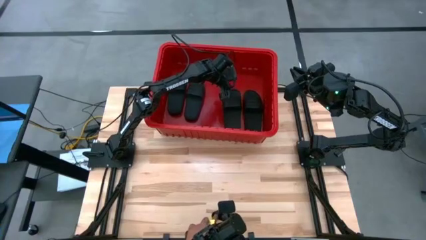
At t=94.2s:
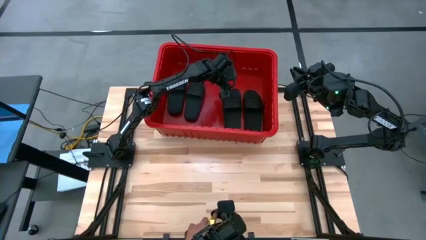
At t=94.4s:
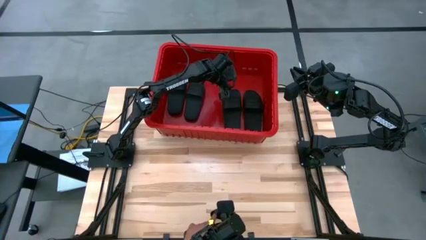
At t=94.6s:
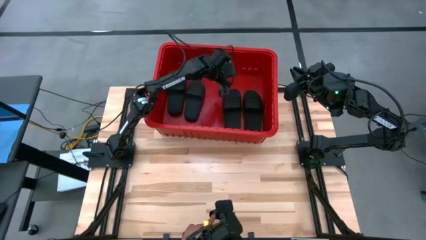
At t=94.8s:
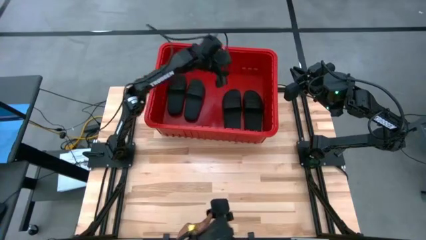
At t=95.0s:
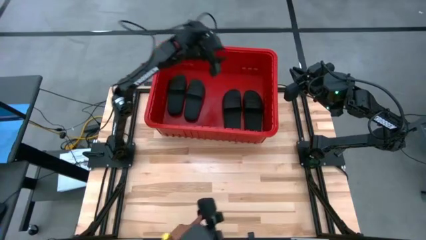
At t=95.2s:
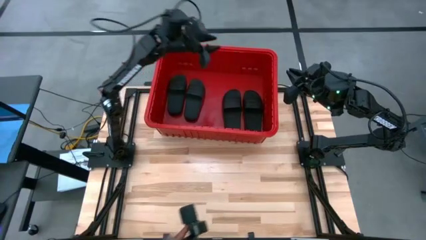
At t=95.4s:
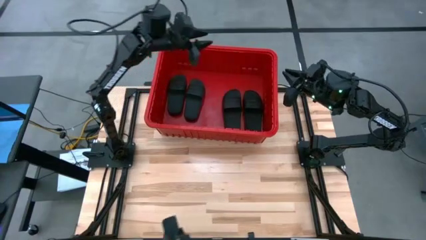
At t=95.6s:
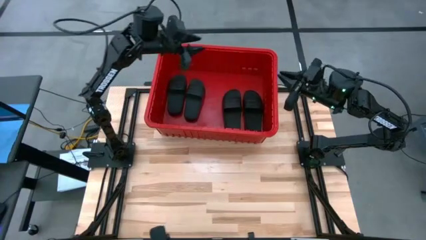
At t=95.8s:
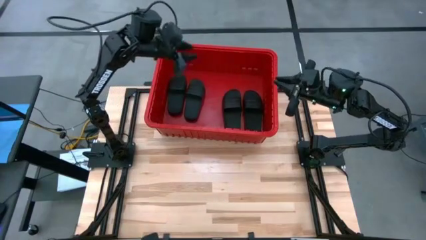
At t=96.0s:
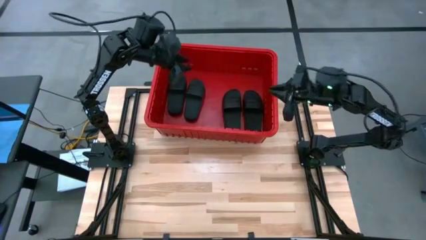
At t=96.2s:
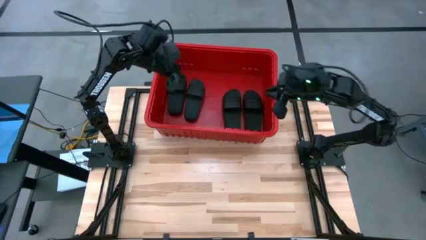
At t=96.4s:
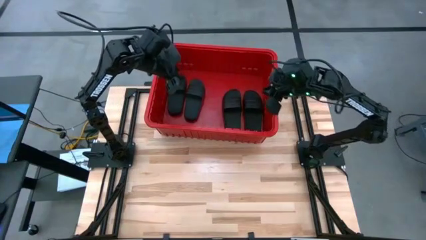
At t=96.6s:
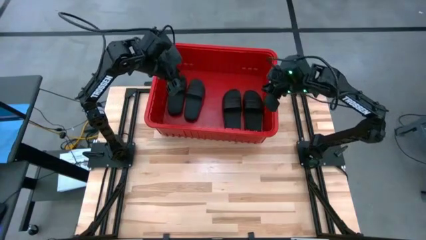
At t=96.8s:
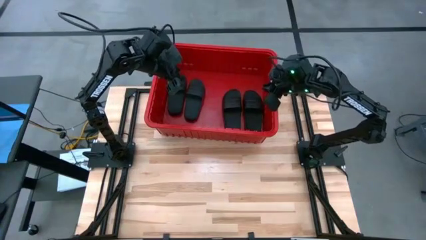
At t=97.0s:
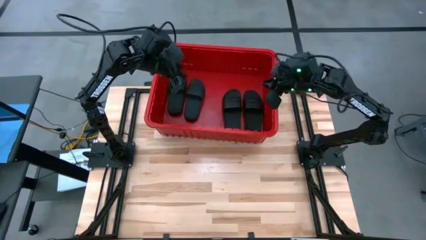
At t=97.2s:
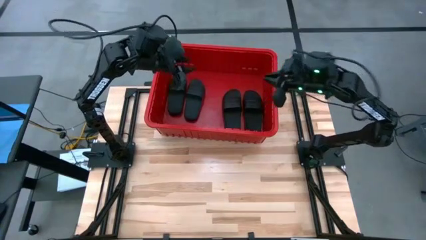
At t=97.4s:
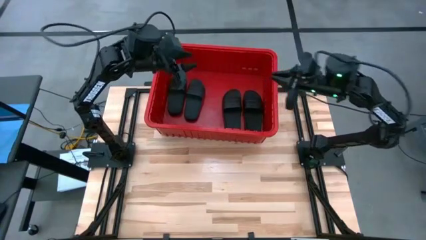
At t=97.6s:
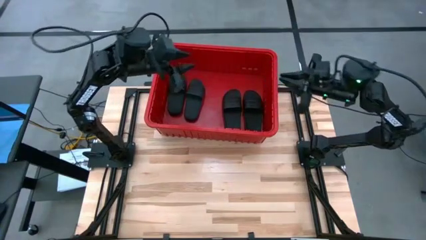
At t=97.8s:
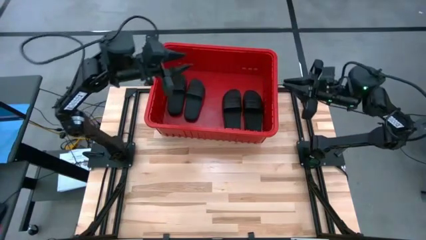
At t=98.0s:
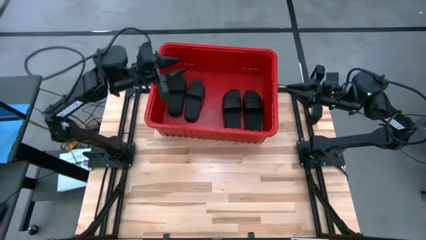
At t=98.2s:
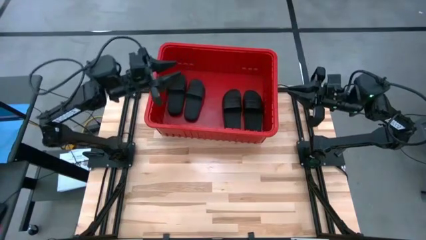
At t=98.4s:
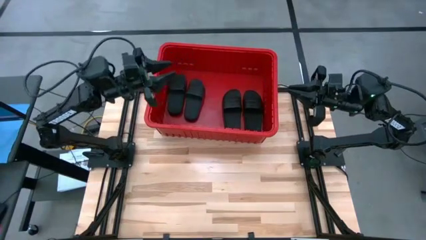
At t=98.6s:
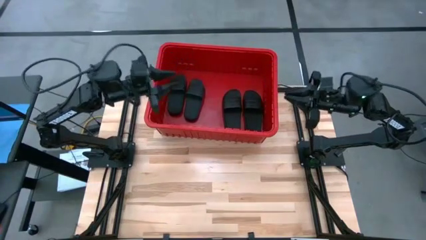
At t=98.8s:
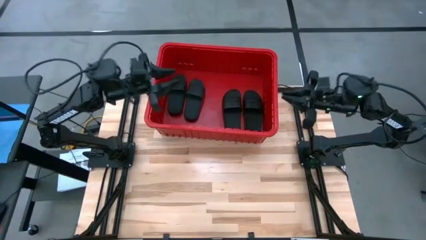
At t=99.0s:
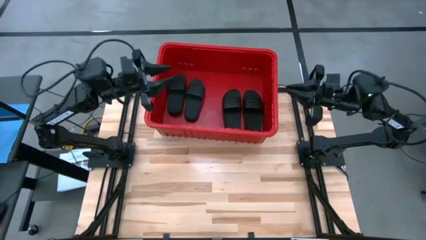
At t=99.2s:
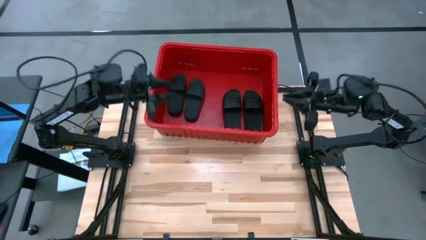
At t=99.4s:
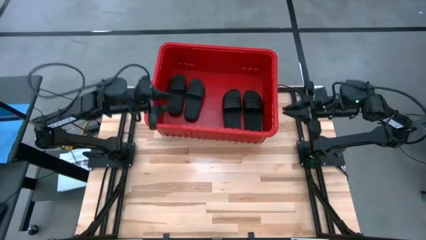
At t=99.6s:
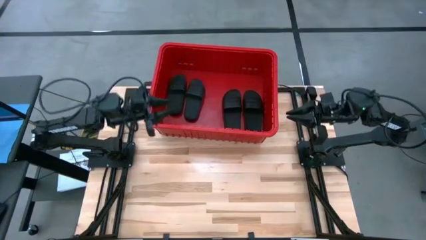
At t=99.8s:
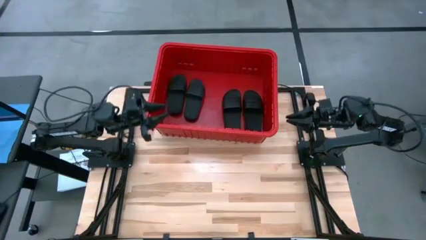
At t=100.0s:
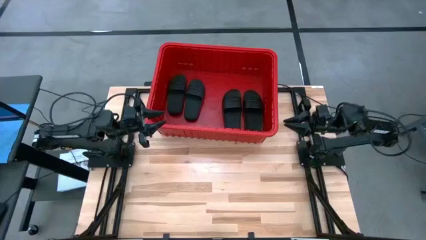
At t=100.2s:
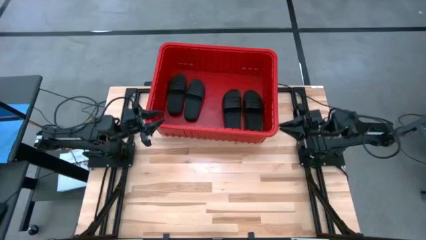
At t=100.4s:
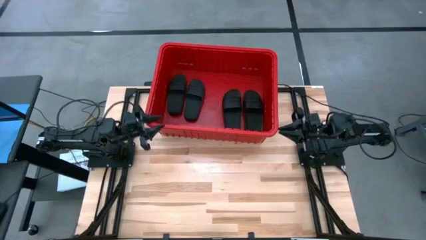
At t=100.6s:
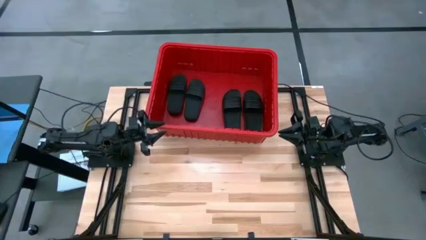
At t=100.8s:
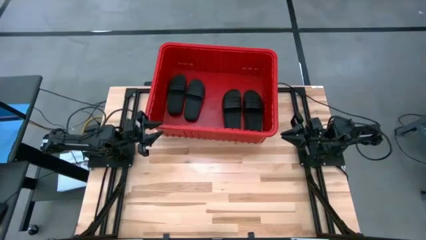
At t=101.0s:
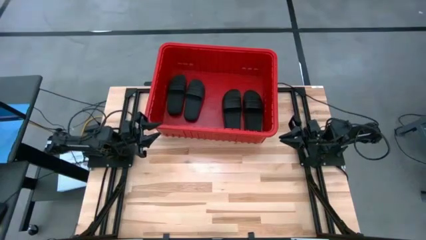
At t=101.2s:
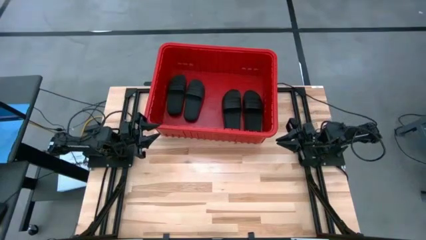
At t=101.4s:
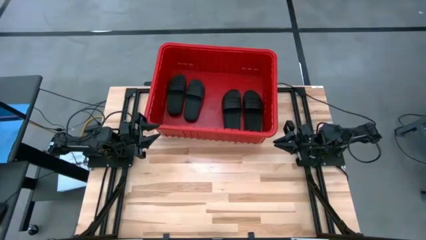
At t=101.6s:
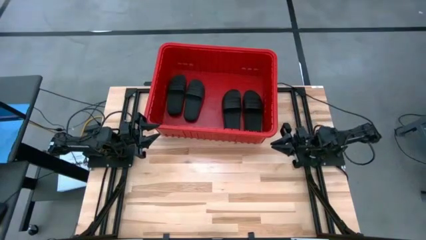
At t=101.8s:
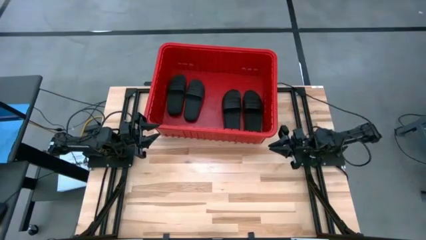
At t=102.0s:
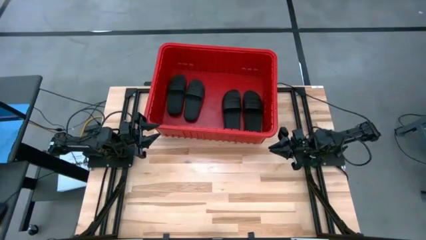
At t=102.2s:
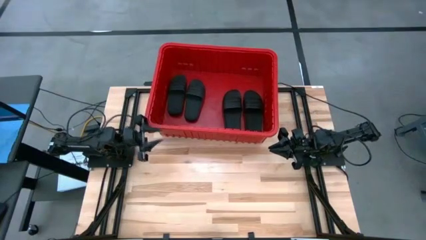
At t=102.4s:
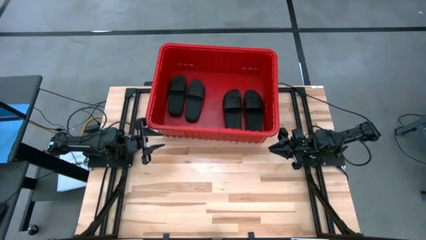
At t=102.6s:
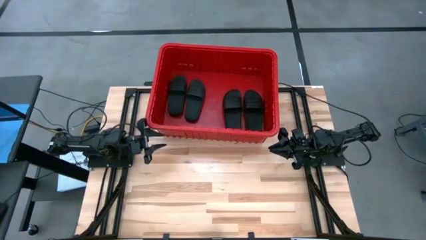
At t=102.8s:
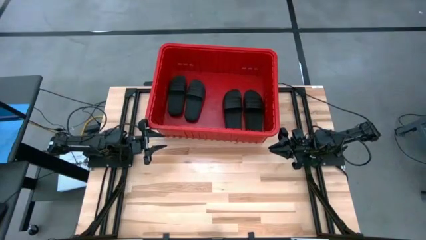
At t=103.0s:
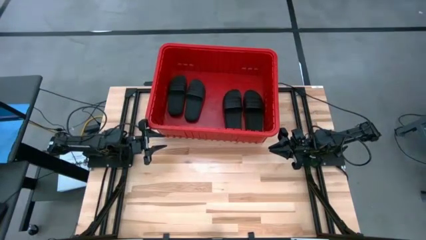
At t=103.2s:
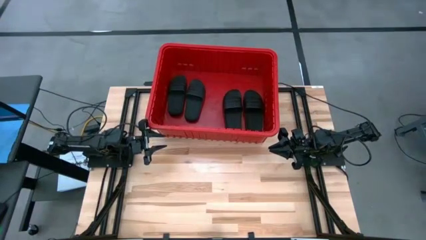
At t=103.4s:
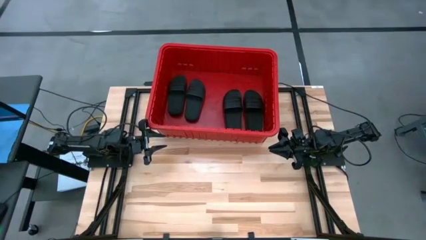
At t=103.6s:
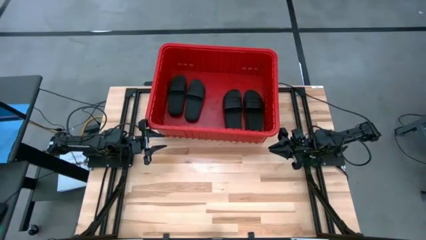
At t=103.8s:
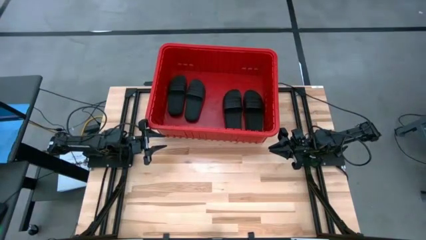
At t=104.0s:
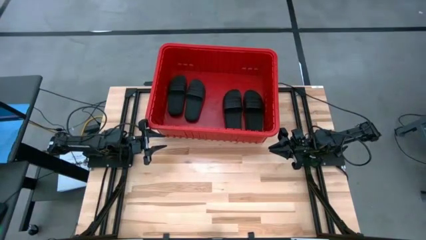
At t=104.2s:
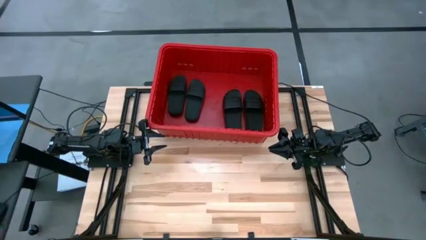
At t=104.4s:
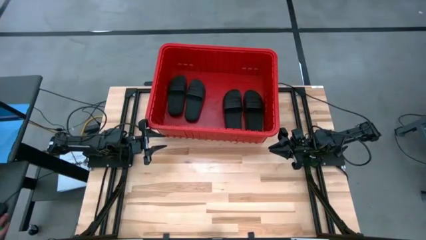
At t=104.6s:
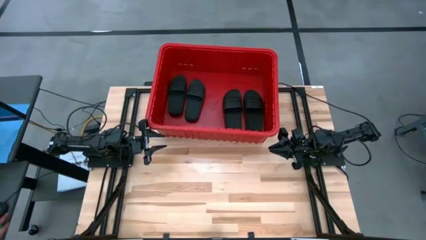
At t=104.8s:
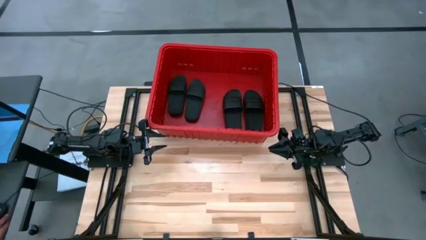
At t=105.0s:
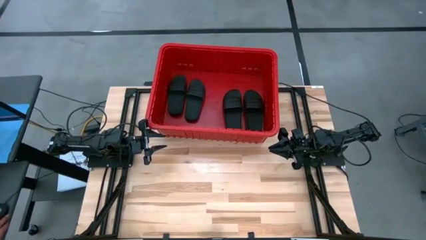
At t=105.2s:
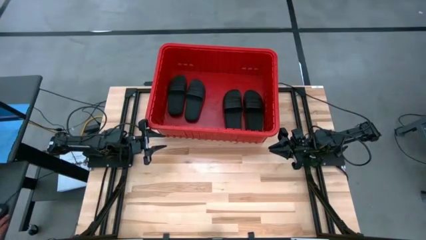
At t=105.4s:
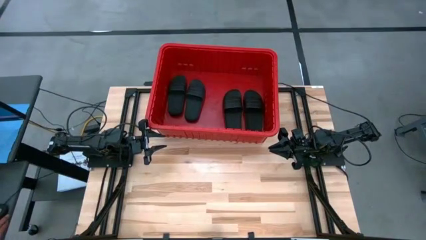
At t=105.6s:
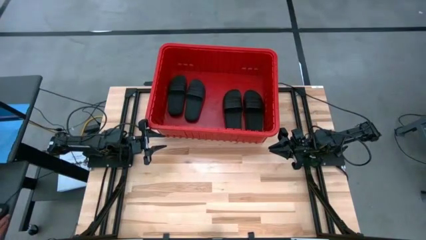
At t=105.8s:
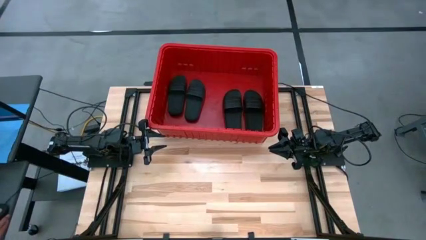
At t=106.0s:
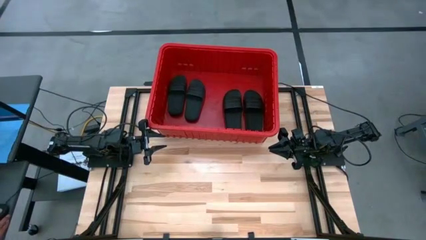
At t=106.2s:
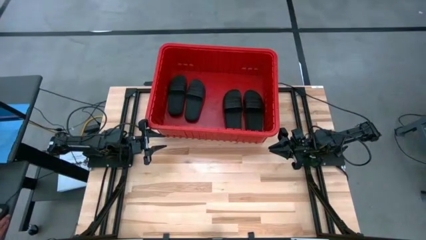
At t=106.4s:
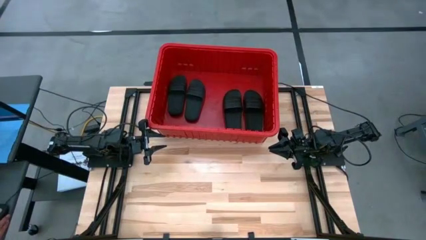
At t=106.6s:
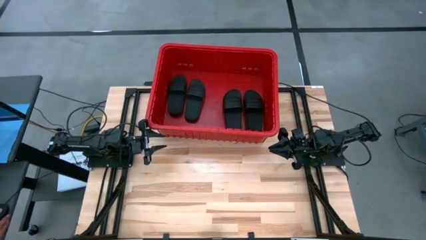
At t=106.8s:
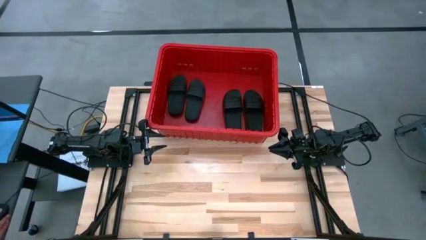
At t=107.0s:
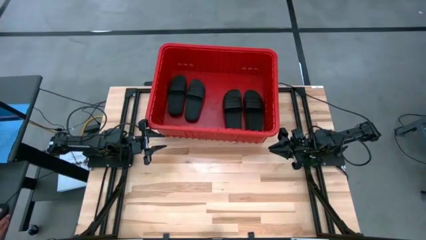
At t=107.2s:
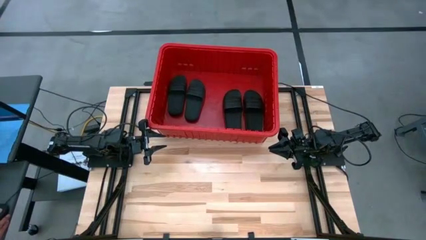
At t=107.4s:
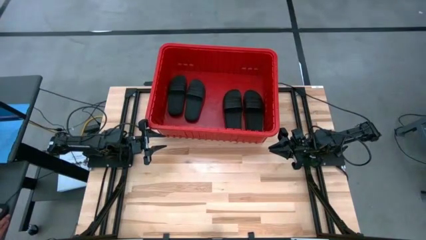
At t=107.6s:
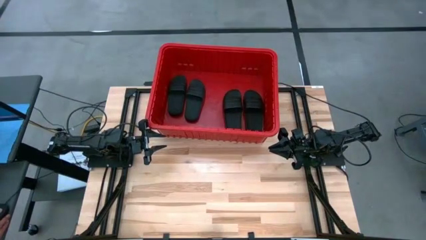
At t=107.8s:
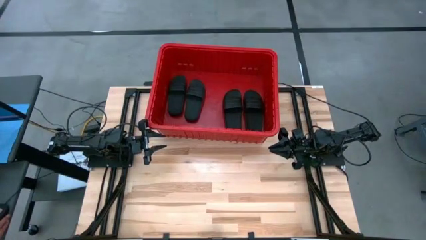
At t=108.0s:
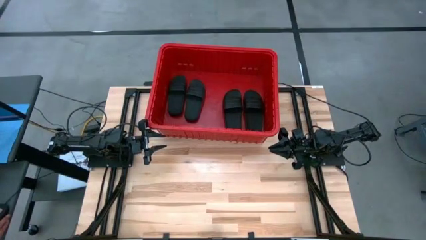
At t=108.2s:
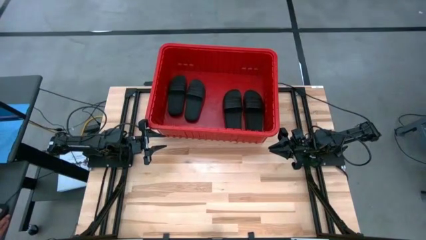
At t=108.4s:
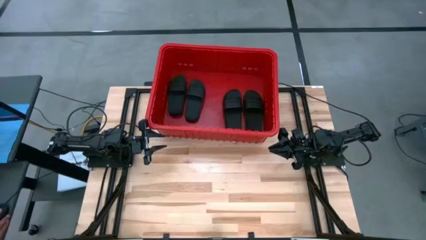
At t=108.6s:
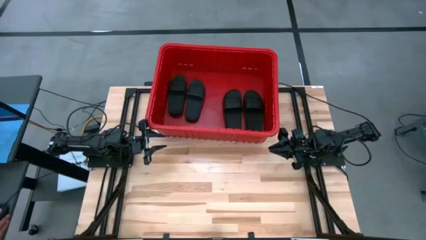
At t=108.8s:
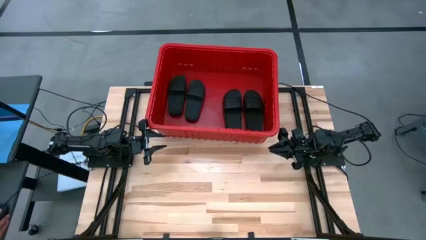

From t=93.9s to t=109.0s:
Task: Pick and place slides into bin
Return to Home Position

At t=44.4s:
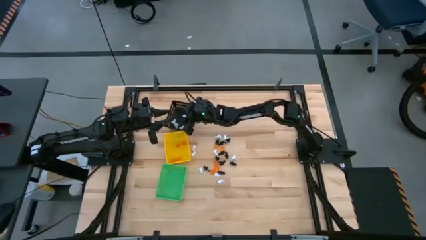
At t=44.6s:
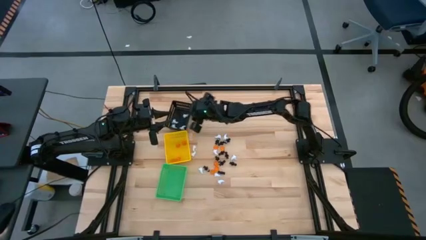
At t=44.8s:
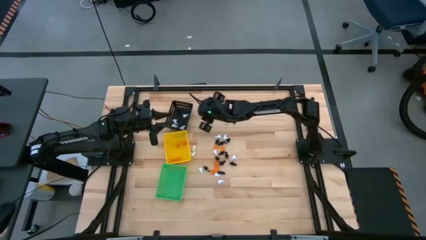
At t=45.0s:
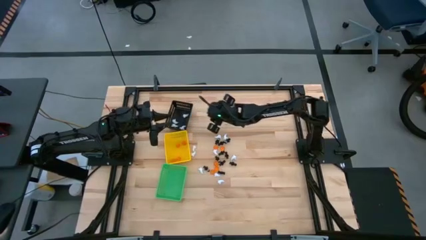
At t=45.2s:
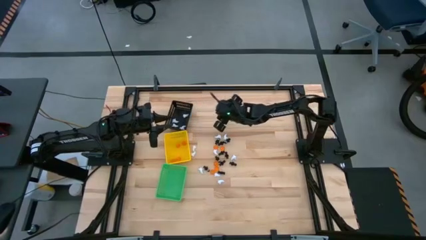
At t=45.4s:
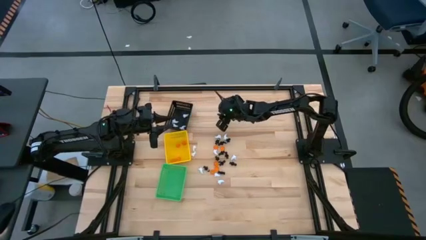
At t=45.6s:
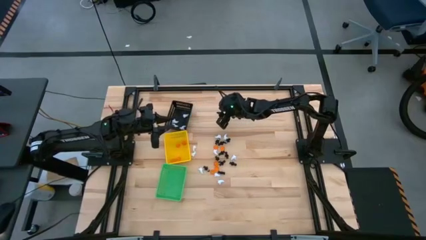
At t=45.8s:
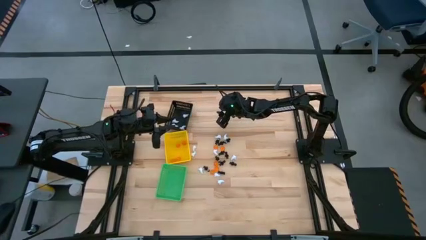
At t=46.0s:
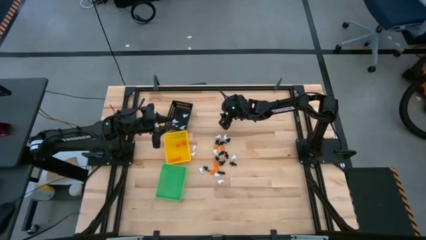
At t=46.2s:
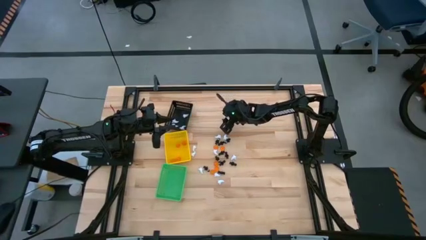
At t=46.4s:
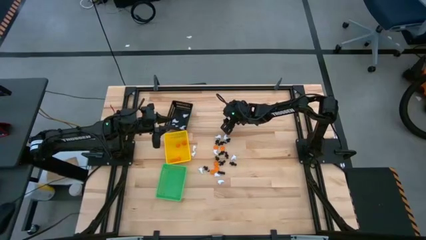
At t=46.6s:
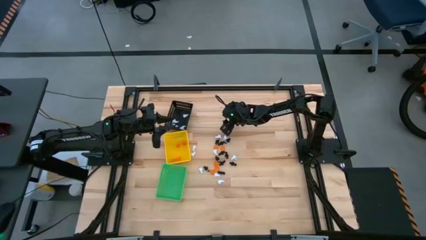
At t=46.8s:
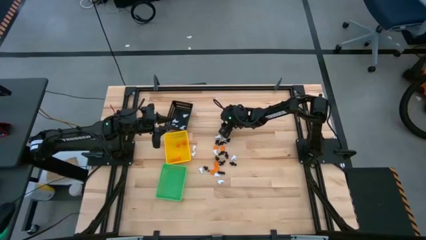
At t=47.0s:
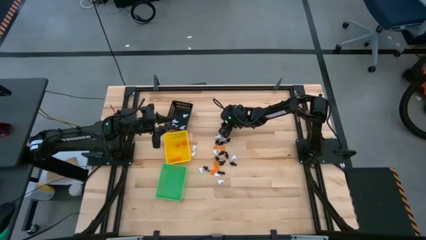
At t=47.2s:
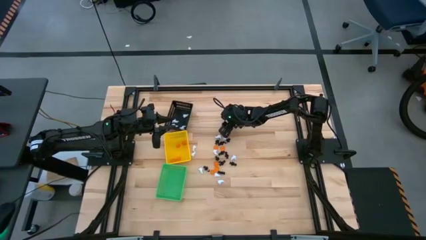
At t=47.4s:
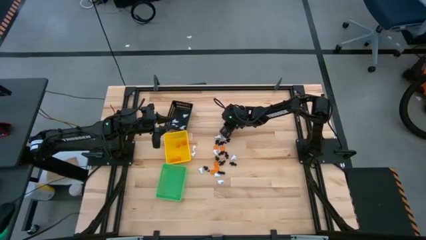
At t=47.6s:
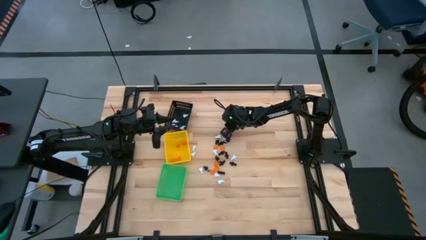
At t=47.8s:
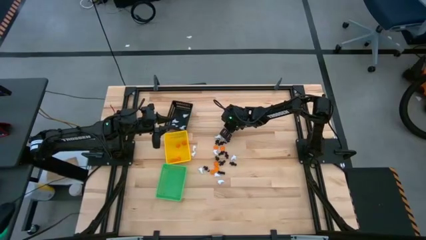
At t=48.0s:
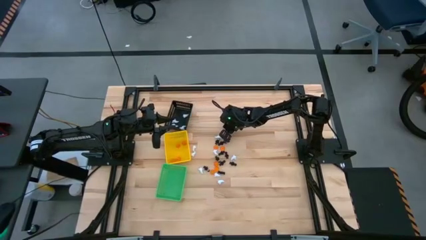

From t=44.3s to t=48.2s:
Task: Sort Halloween decoration
Put the white ghost plush toy into the black basket
